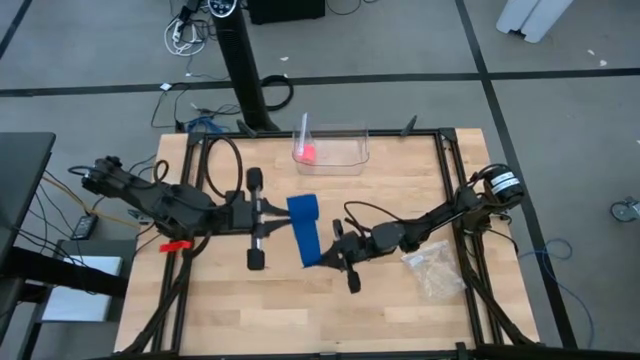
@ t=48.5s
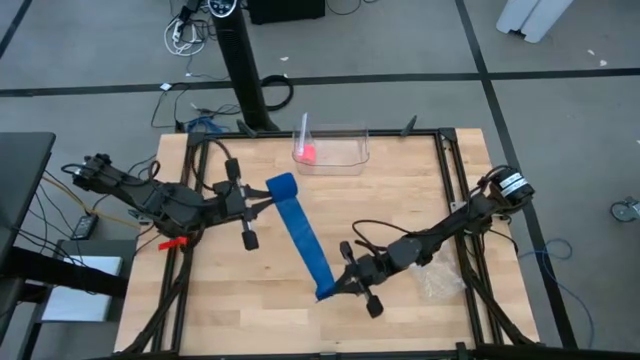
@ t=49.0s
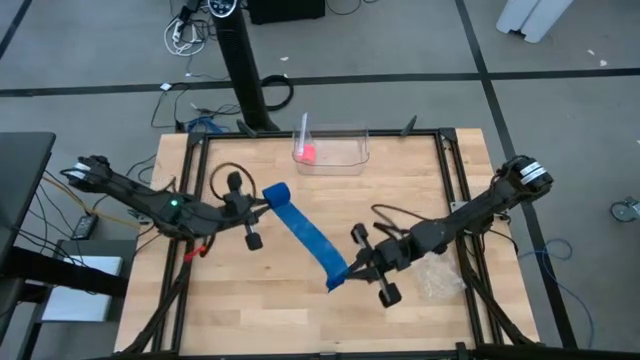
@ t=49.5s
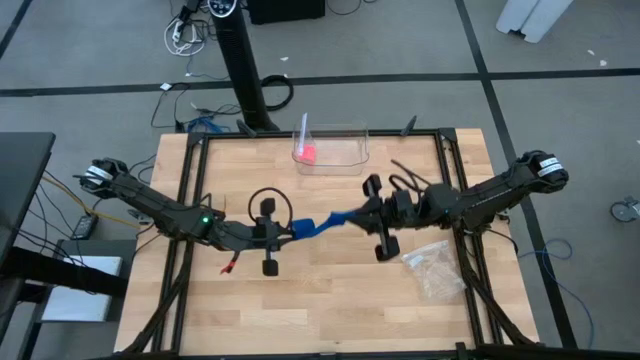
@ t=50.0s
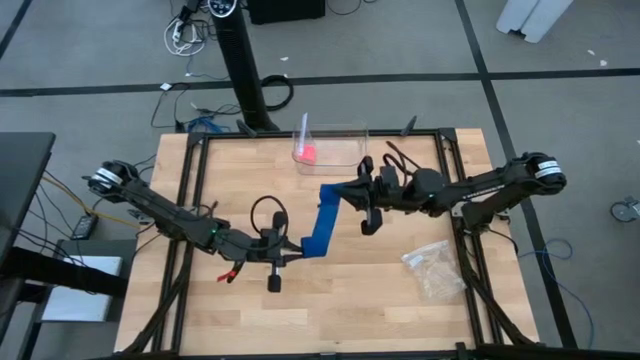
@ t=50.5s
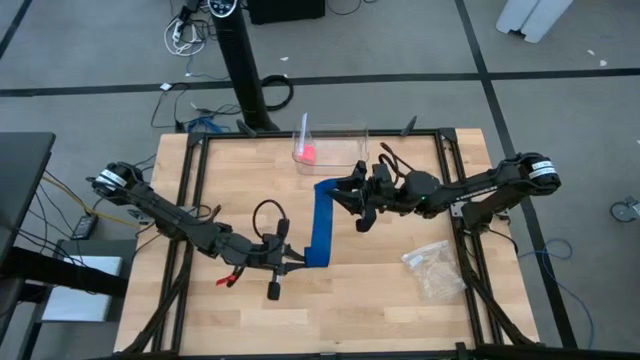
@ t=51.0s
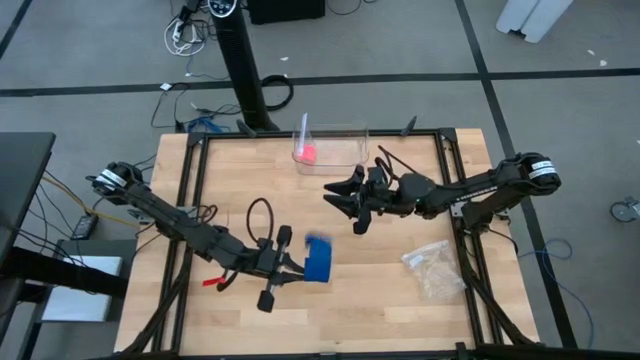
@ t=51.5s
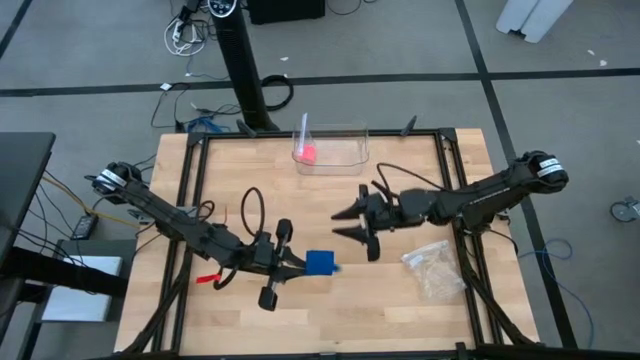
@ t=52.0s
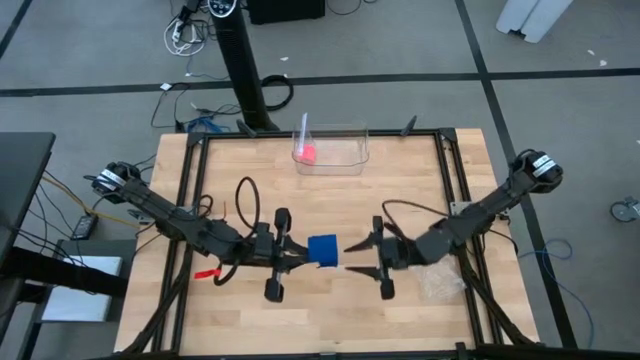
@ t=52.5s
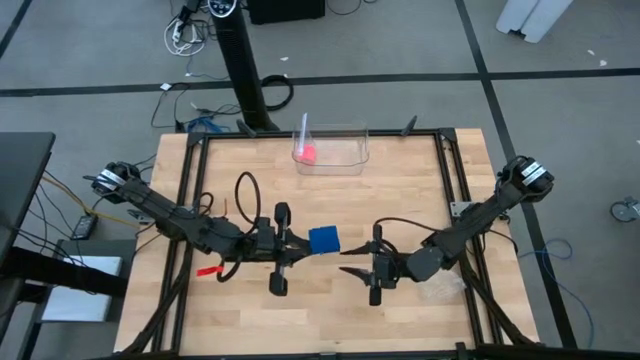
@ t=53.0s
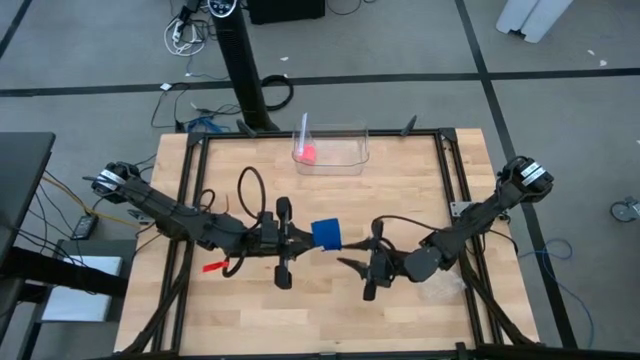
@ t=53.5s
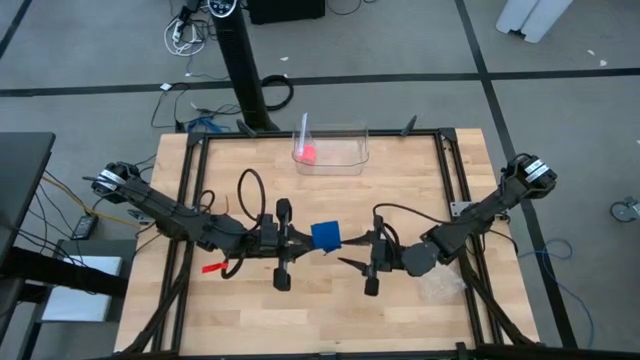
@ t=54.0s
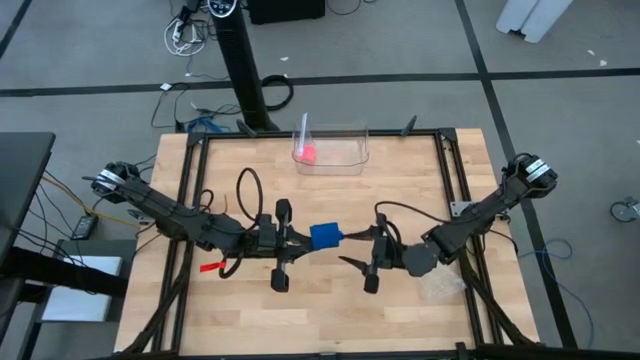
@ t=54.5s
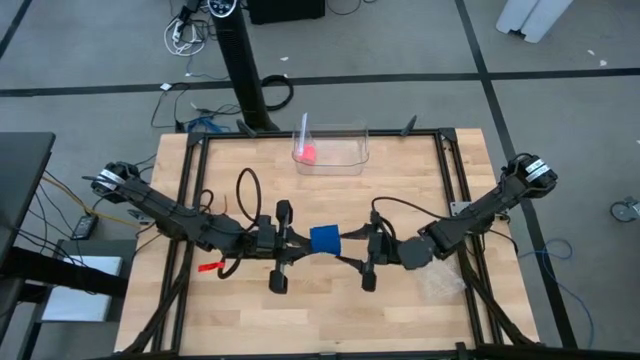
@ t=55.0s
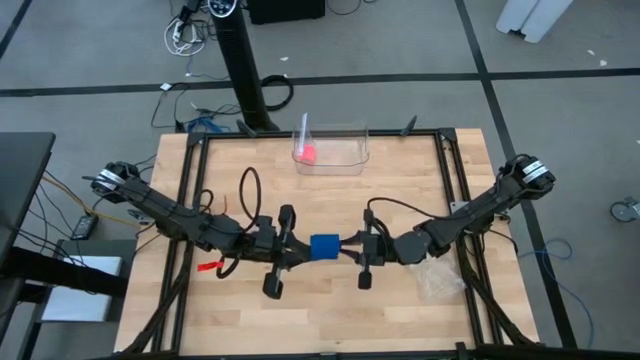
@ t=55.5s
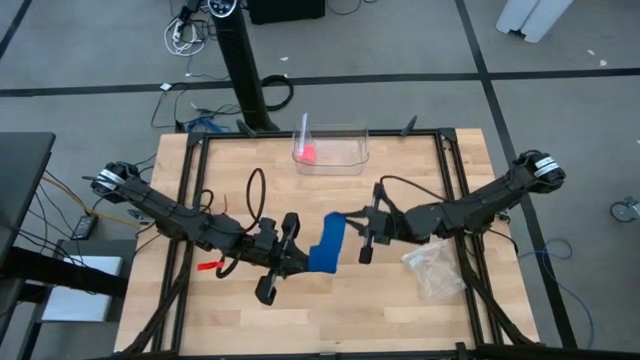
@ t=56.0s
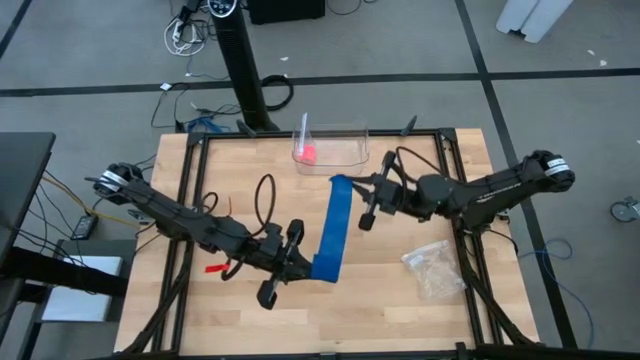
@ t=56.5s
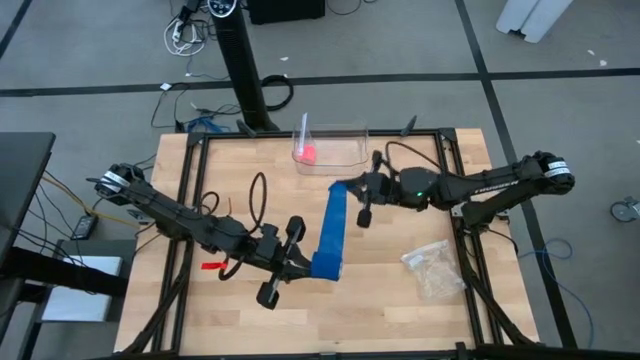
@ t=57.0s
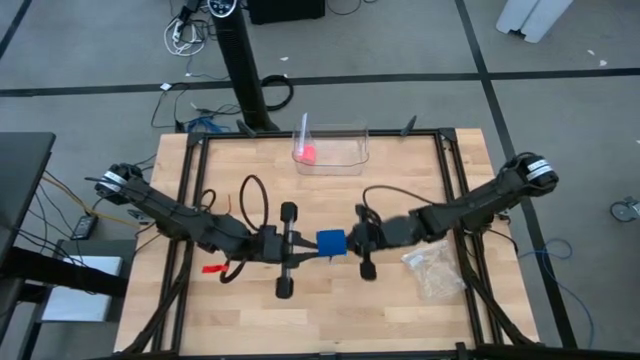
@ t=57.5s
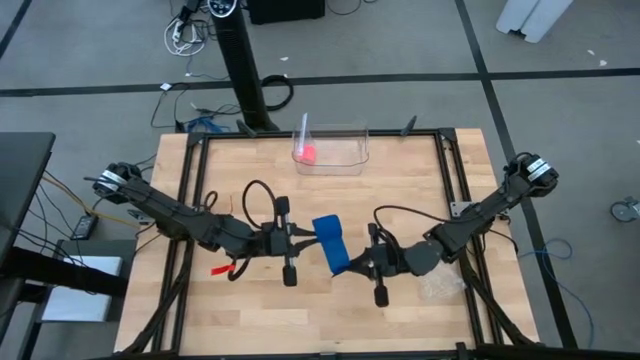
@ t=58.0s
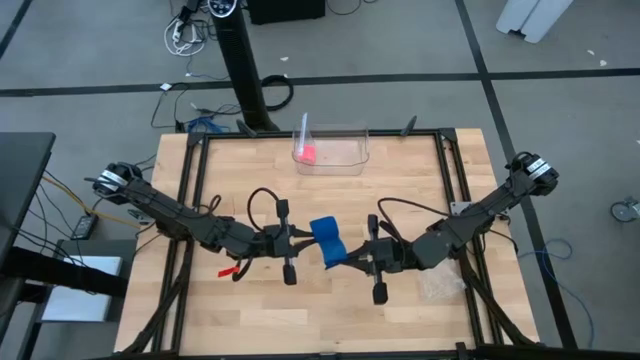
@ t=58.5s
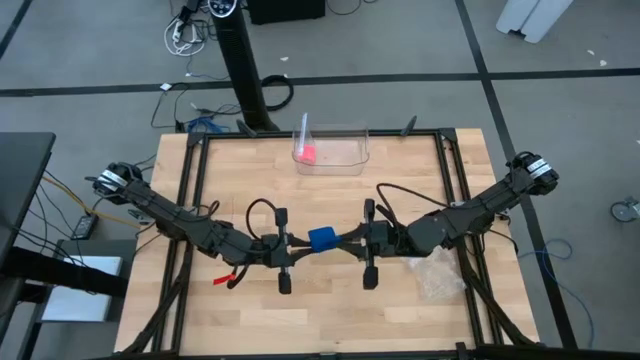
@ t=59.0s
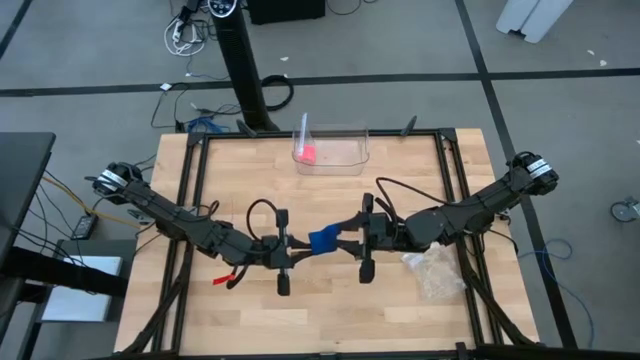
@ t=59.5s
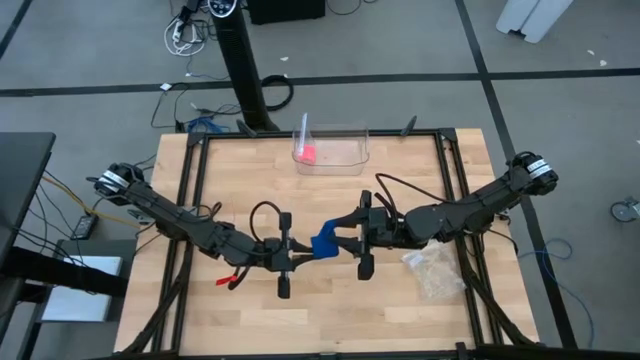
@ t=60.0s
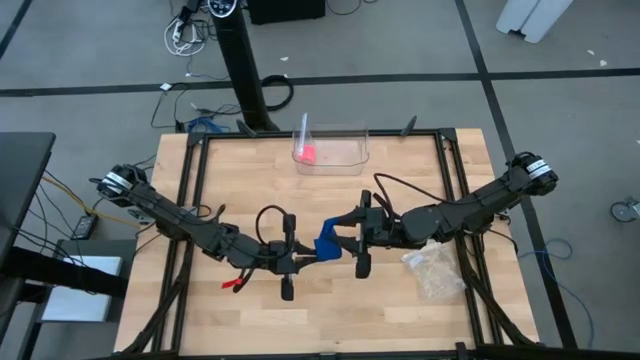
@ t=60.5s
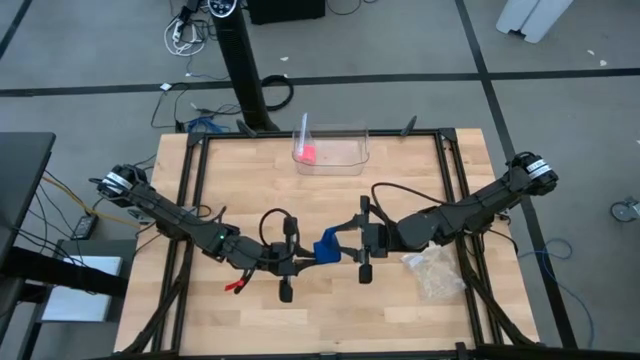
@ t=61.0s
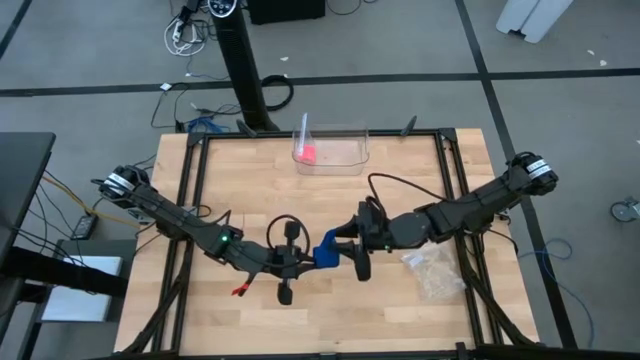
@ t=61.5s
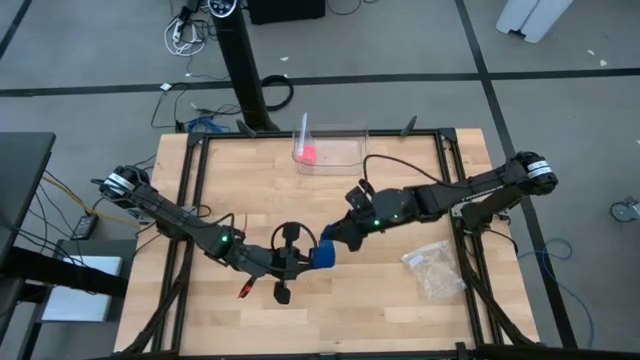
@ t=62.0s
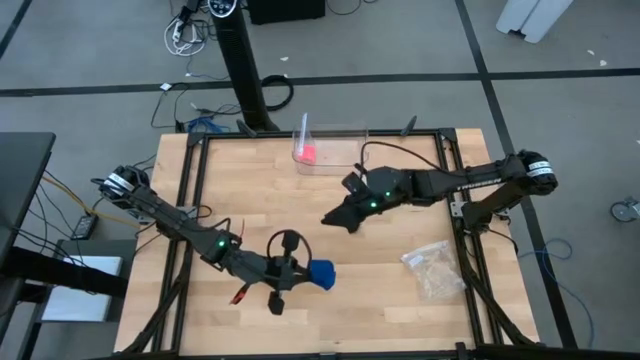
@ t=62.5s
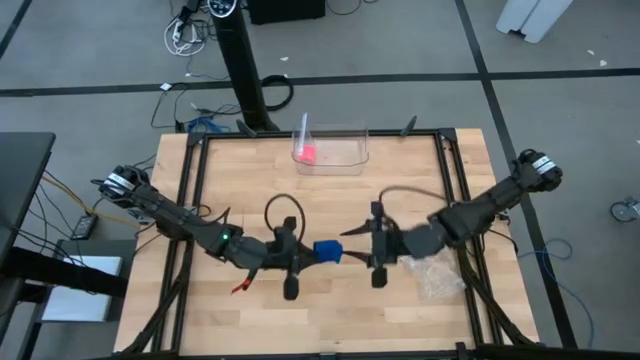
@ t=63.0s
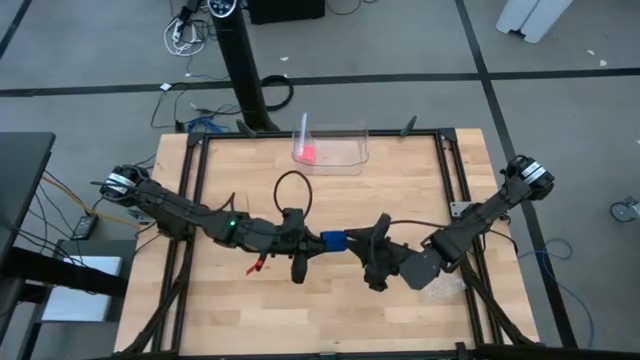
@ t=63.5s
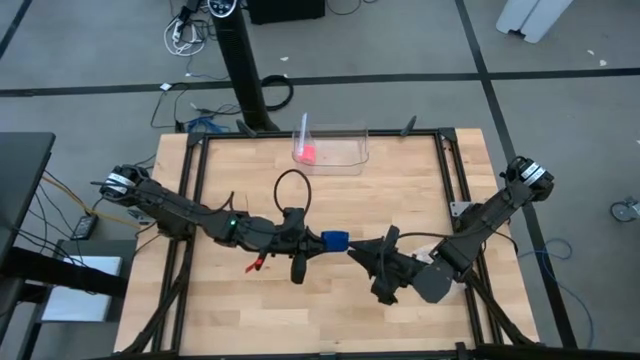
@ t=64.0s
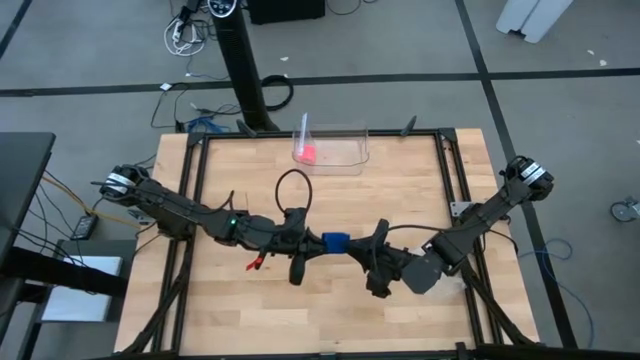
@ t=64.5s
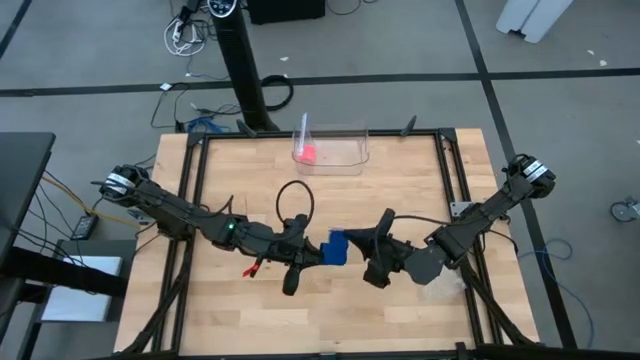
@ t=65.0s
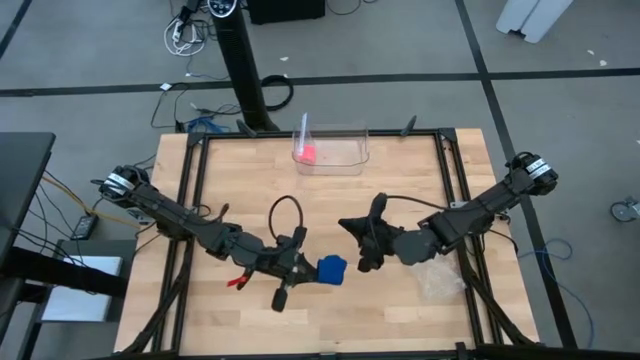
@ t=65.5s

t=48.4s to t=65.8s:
Task: Roll bandage
Roll the blue bandage

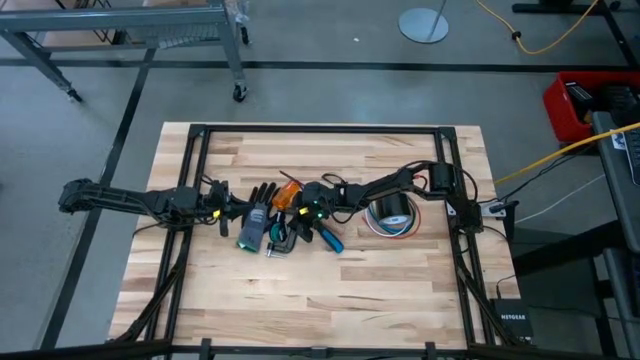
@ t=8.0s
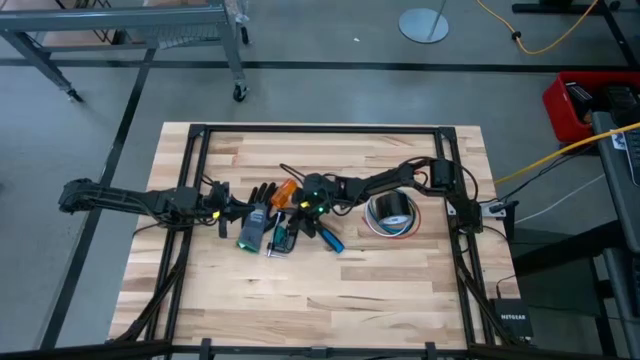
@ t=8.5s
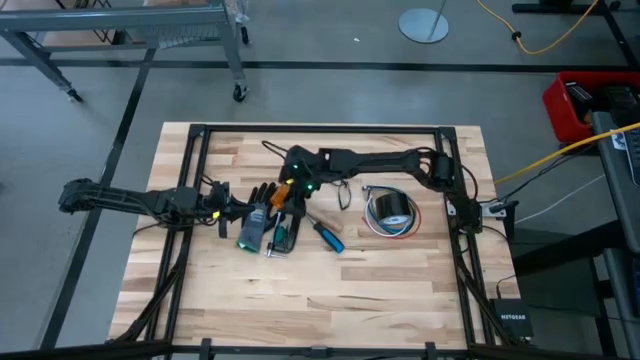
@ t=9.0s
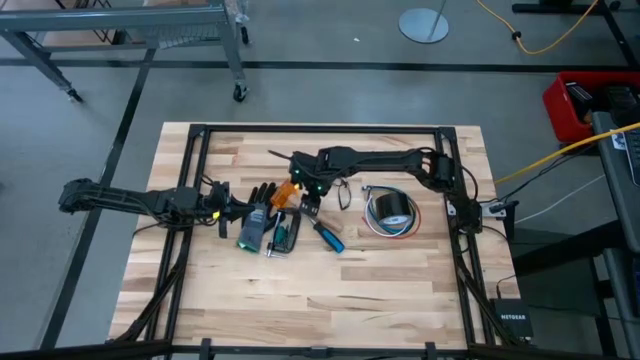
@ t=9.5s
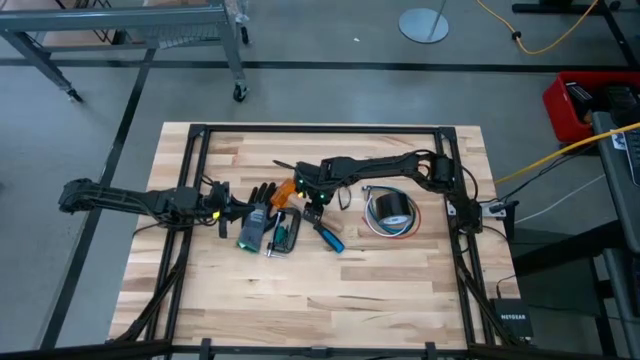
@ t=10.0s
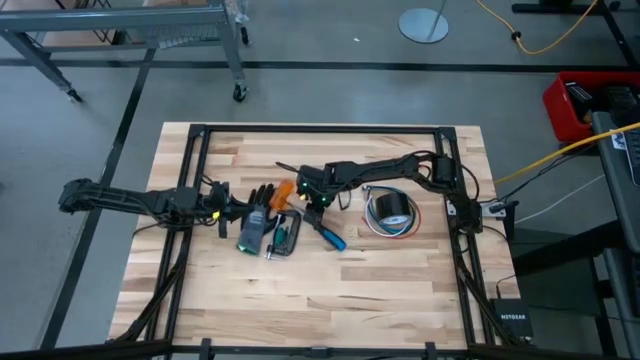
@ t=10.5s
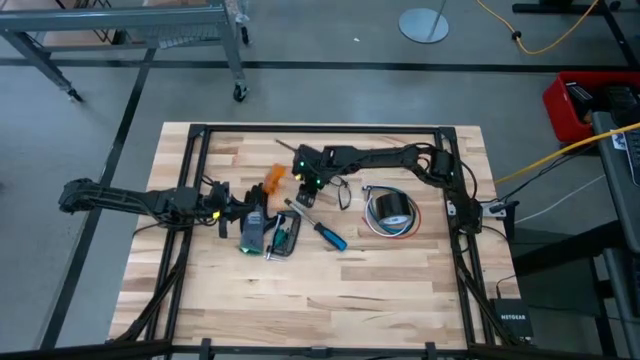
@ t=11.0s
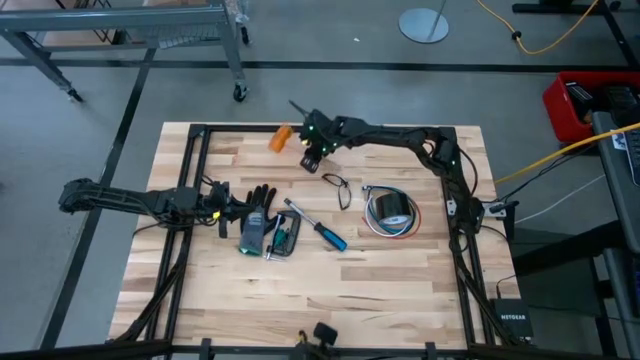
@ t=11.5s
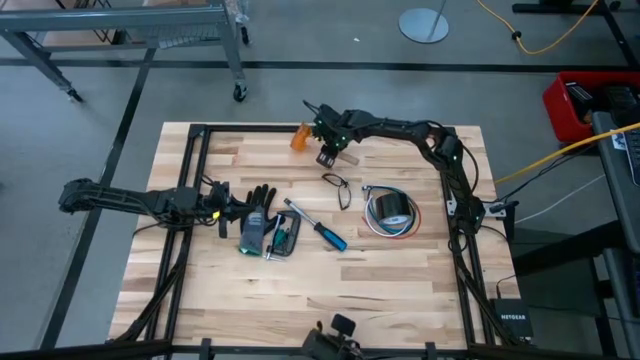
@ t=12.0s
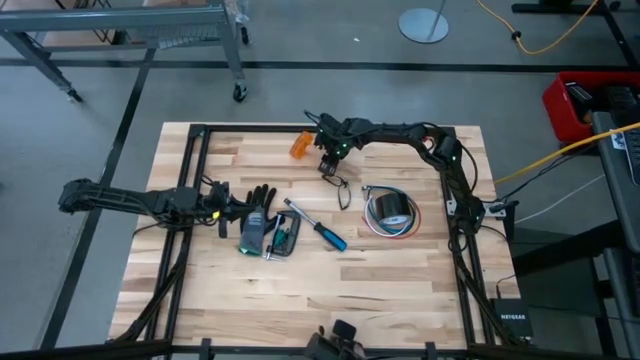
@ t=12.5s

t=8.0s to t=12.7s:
Task: Coil cords
Move the hammer to the top of the table
